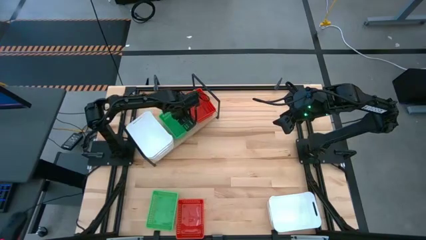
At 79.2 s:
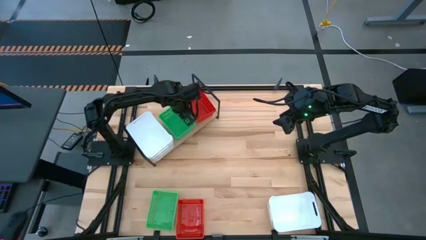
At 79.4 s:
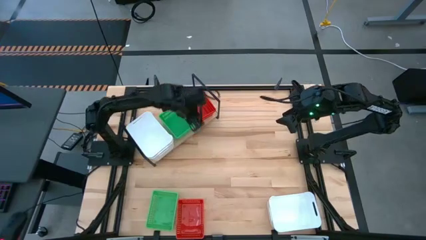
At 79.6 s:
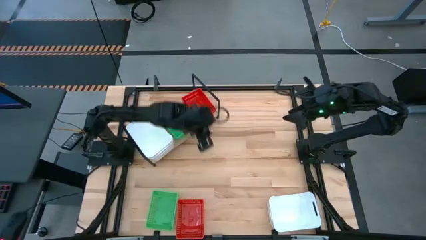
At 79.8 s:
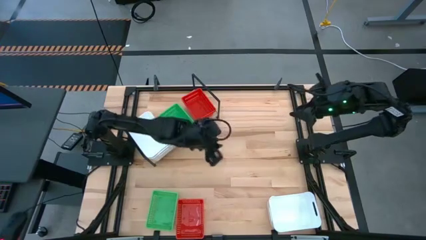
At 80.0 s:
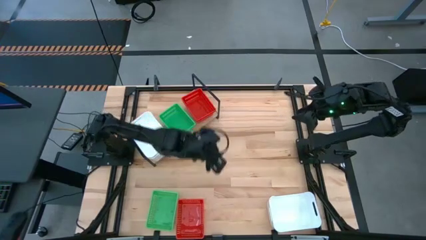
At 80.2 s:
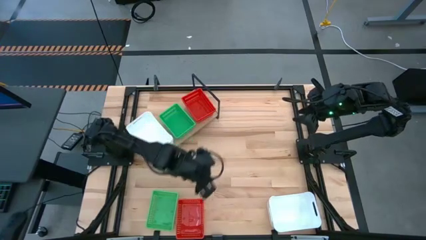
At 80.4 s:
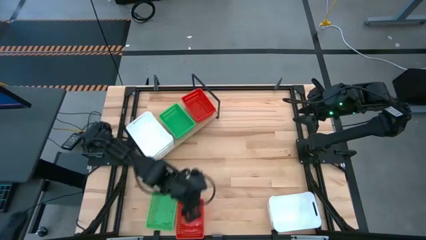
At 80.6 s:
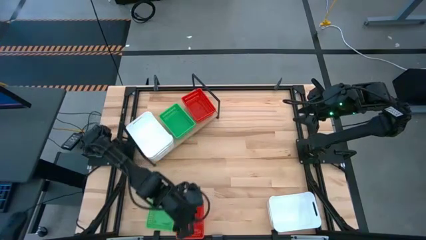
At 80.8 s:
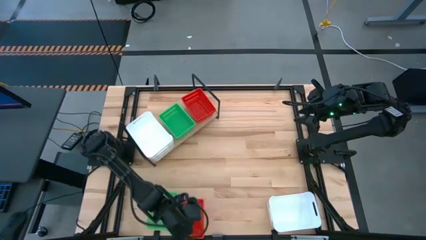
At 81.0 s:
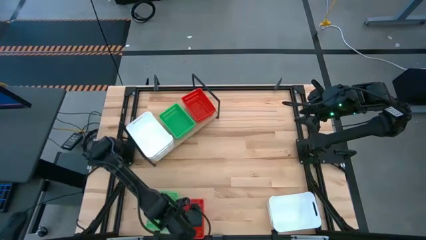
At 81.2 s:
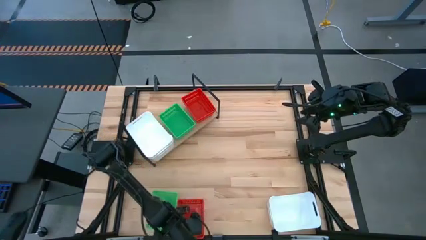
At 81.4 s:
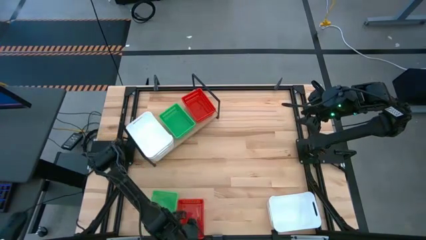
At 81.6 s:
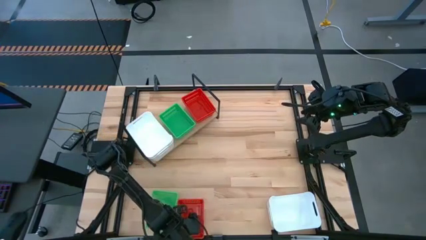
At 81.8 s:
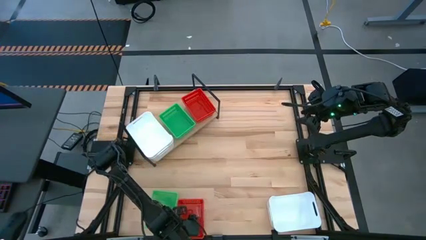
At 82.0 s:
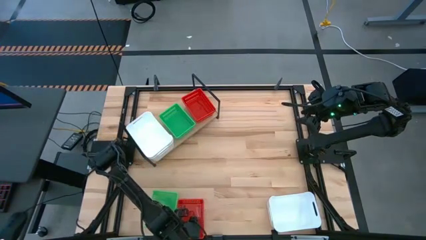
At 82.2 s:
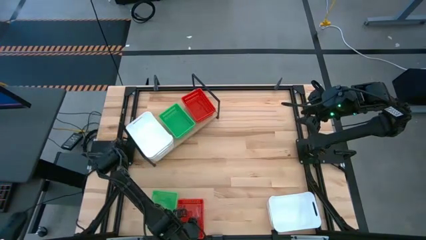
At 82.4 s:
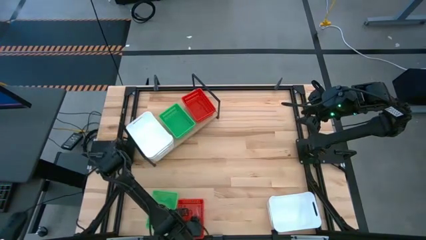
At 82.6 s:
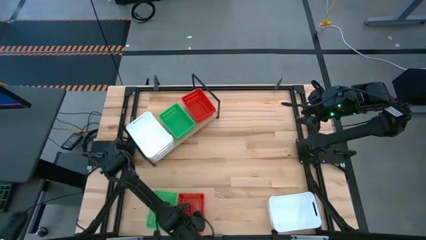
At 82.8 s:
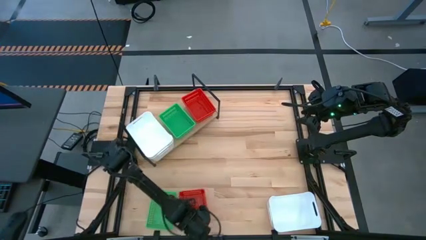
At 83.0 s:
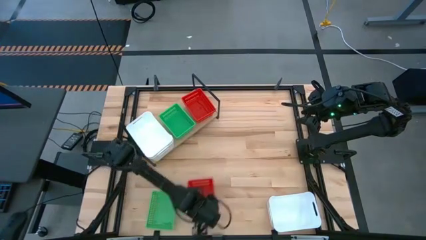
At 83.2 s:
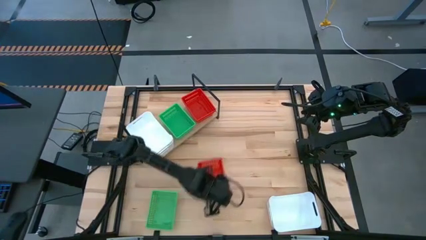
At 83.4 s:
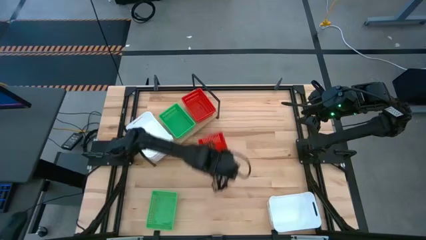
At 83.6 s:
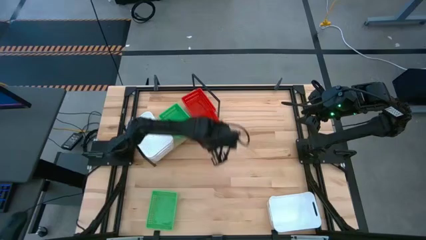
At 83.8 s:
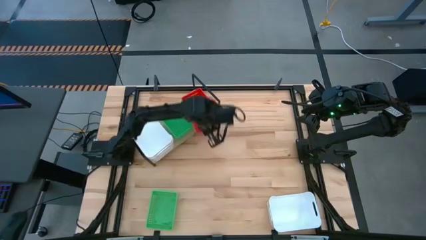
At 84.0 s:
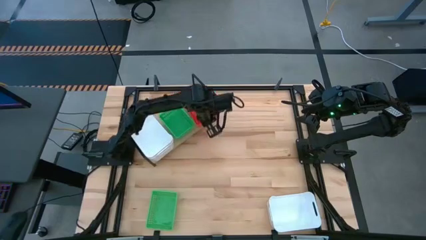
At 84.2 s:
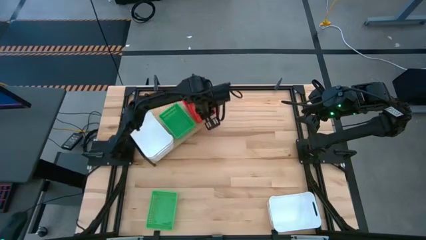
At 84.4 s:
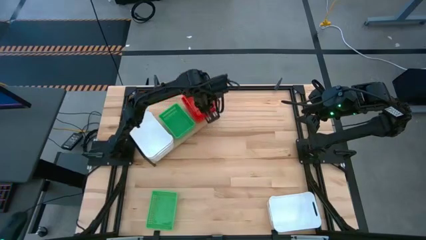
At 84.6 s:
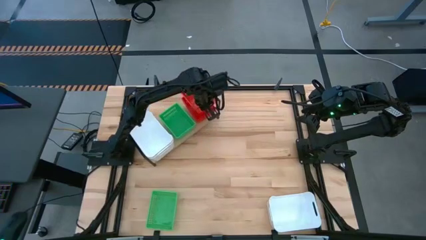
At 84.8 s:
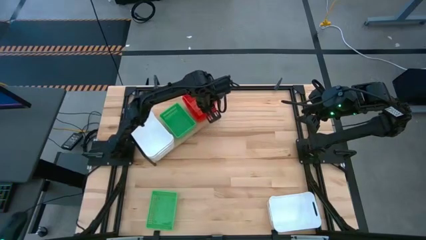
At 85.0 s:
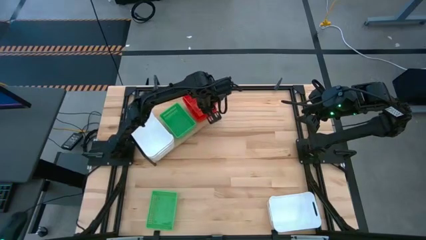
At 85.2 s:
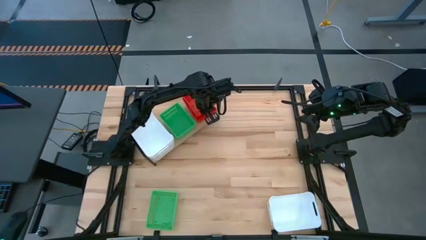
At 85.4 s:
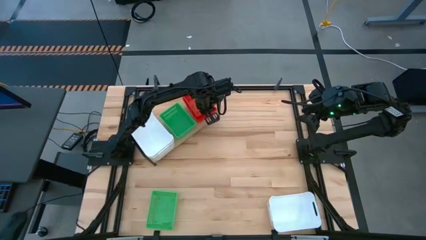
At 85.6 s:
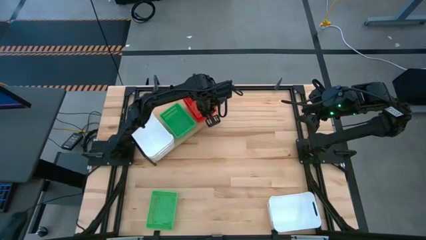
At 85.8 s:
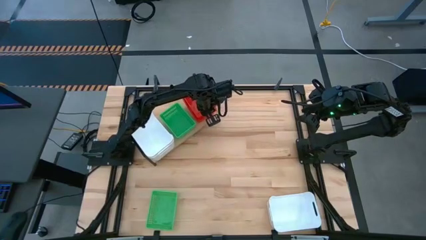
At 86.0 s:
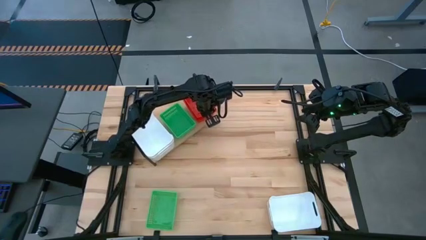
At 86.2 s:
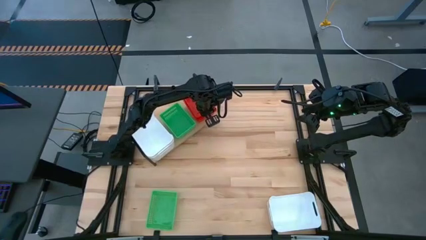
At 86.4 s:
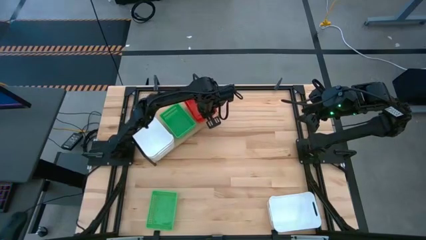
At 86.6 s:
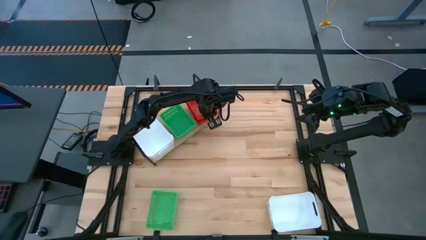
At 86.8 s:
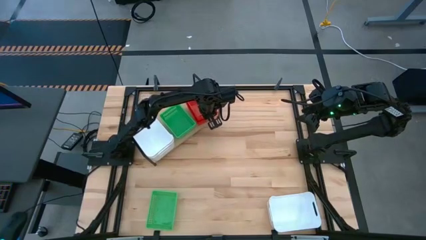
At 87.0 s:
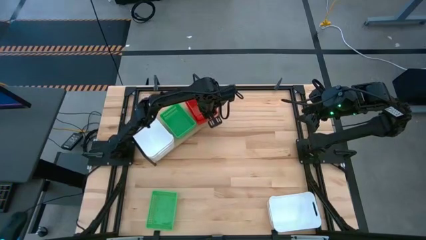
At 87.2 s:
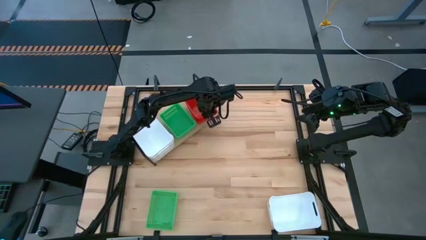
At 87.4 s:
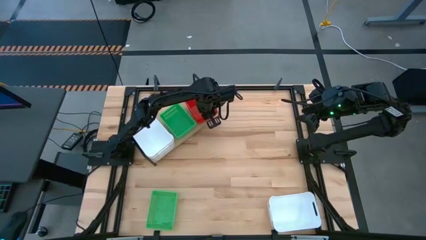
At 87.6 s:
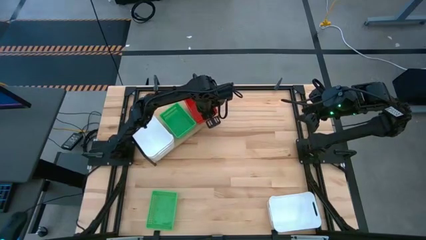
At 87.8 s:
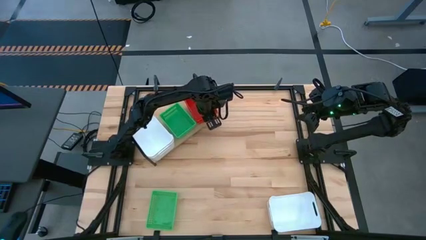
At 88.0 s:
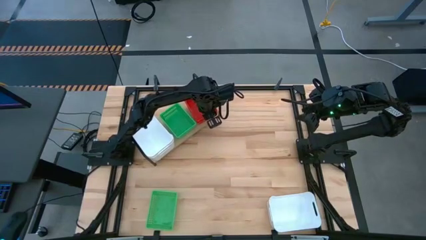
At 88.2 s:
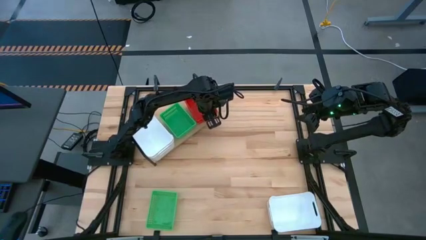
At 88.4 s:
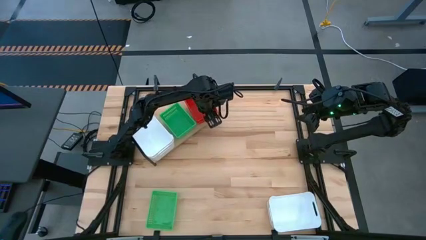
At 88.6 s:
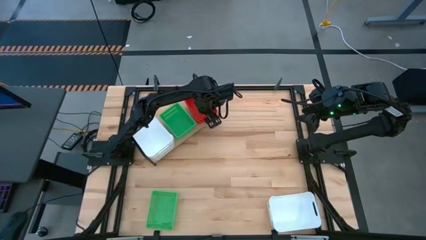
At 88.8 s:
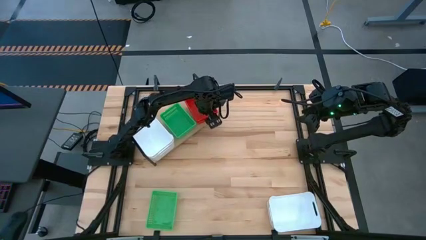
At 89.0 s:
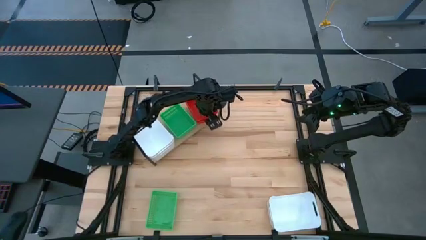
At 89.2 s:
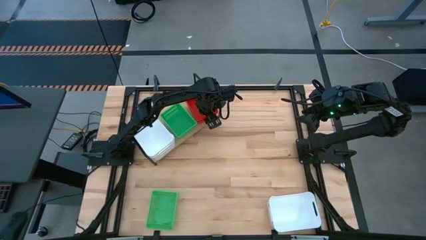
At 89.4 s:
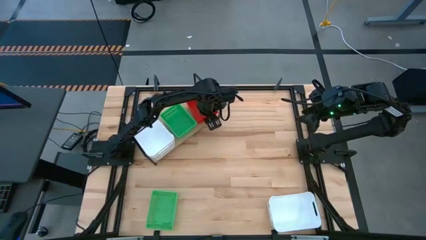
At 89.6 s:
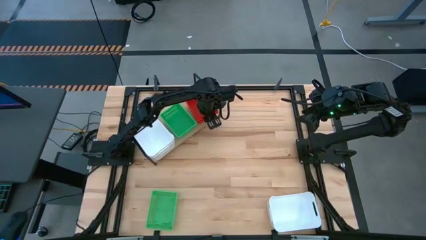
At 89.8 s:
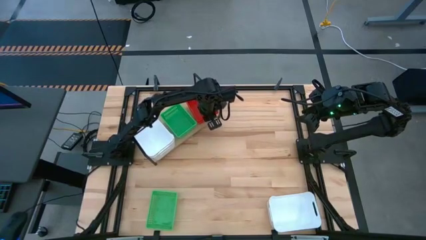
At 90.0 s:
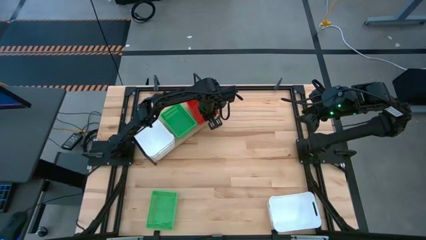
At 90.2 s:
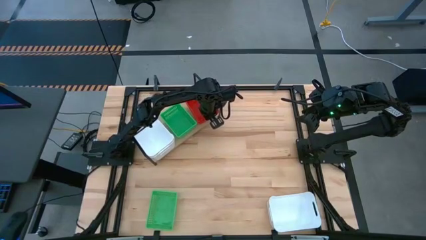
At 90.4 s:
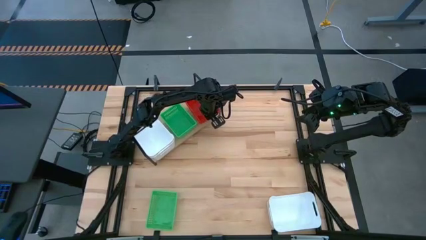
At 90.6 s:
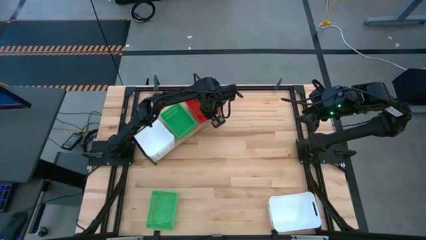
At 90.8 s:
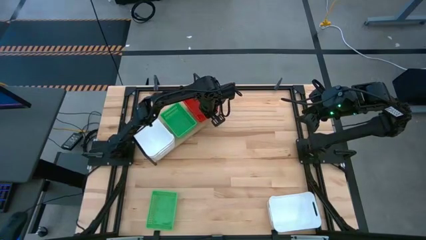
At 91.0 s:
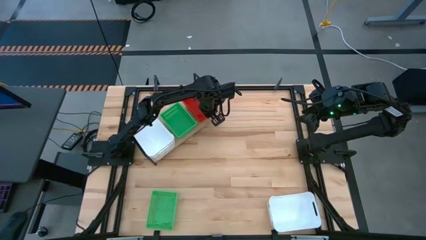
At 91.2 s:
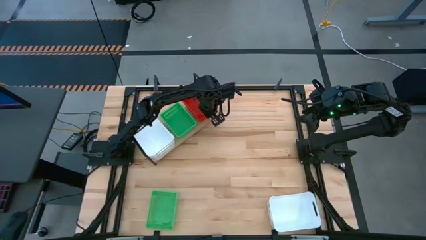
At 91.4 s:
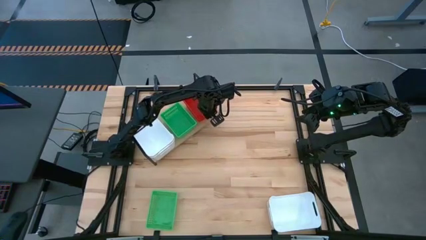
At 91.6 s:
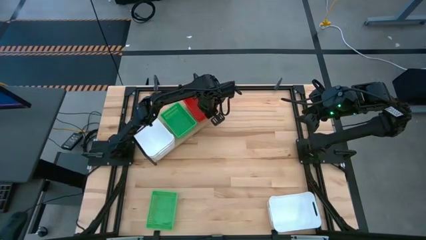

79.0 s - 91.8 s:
Task: Stack baskets on shelf by color
Stack the red bin on top of the red bin on the shelf
